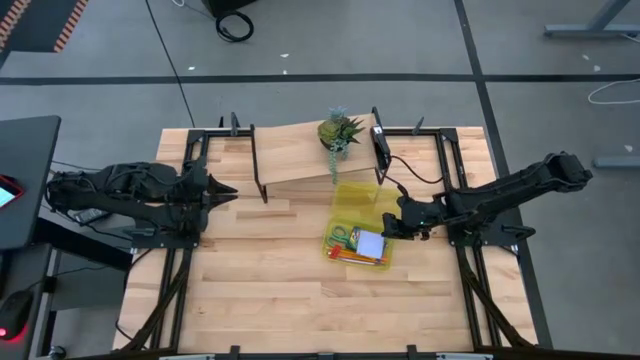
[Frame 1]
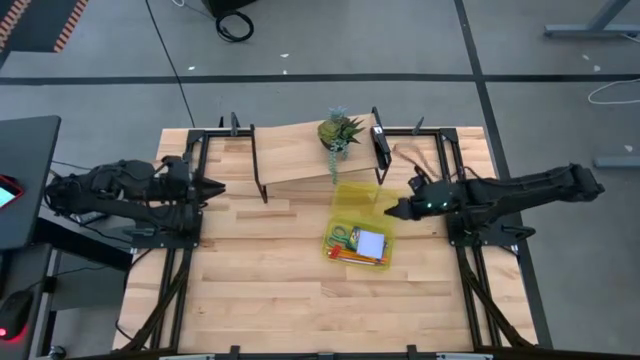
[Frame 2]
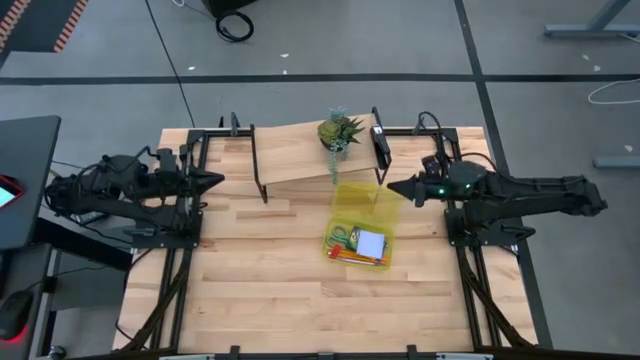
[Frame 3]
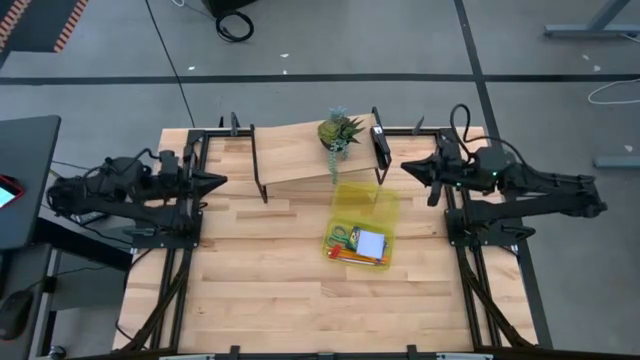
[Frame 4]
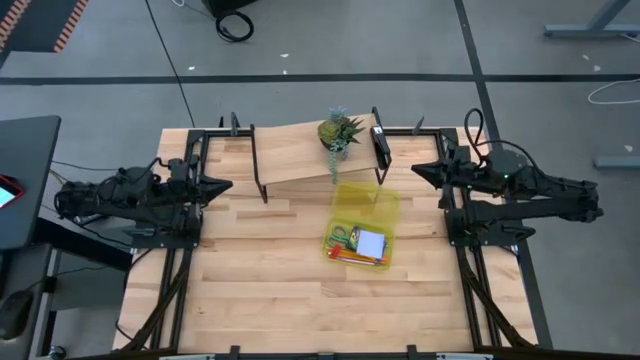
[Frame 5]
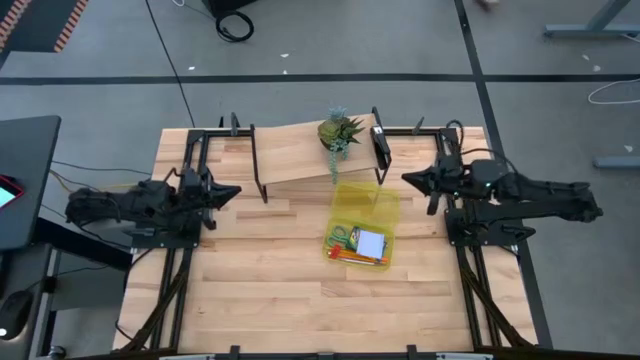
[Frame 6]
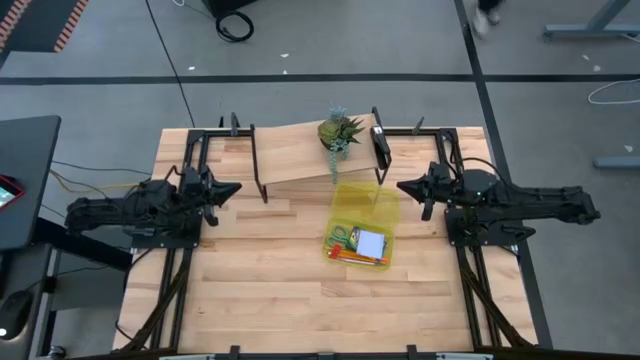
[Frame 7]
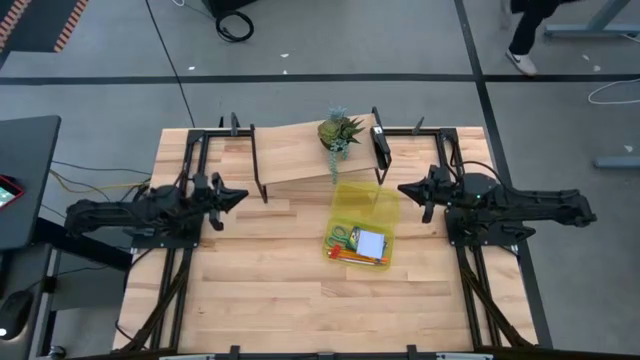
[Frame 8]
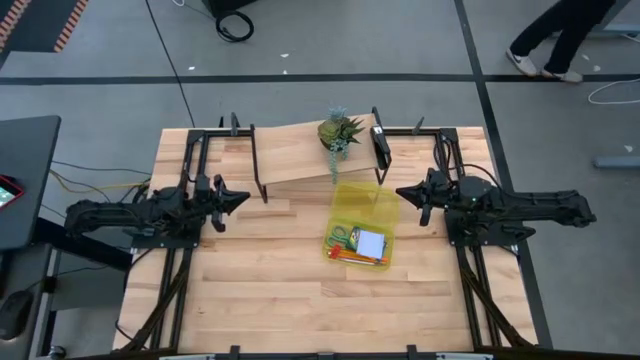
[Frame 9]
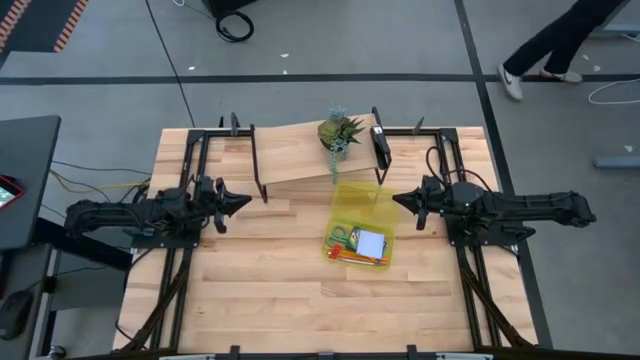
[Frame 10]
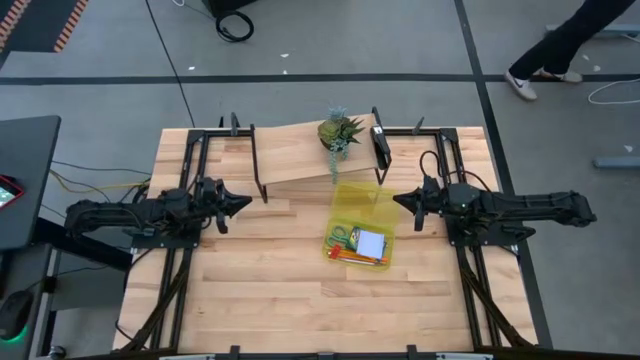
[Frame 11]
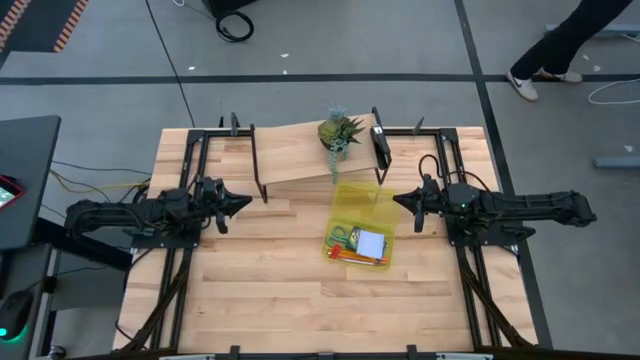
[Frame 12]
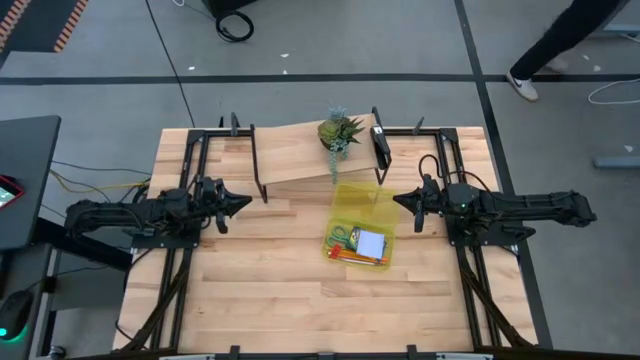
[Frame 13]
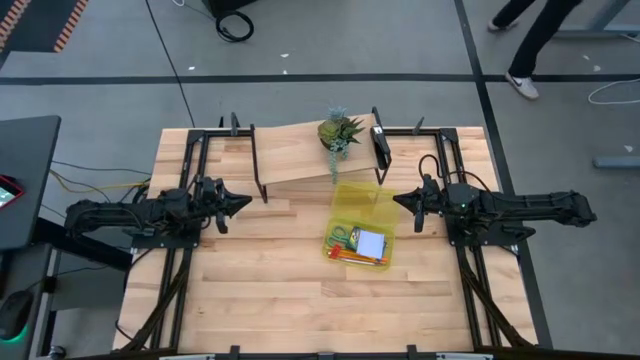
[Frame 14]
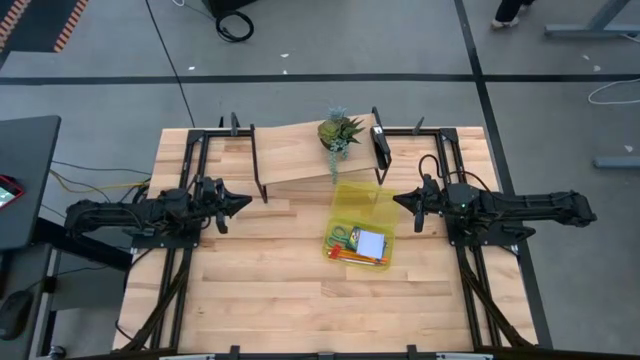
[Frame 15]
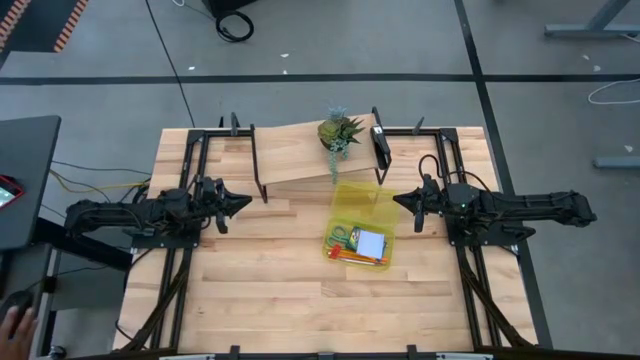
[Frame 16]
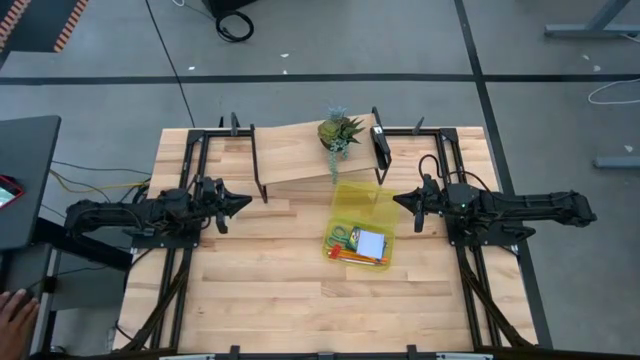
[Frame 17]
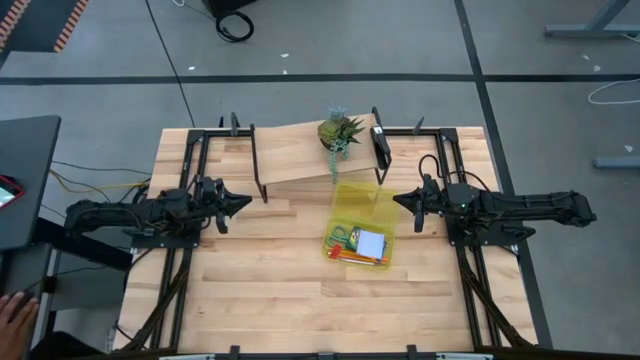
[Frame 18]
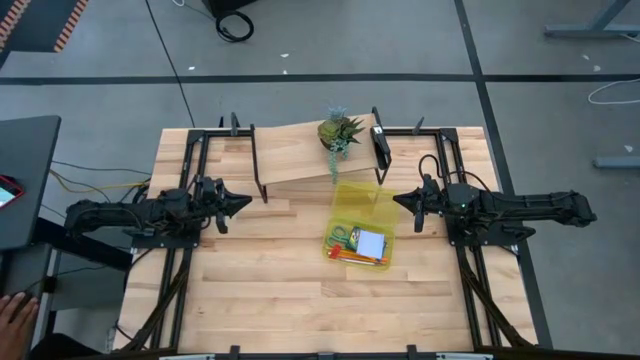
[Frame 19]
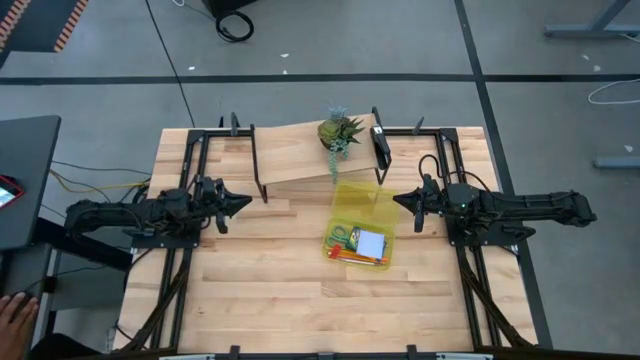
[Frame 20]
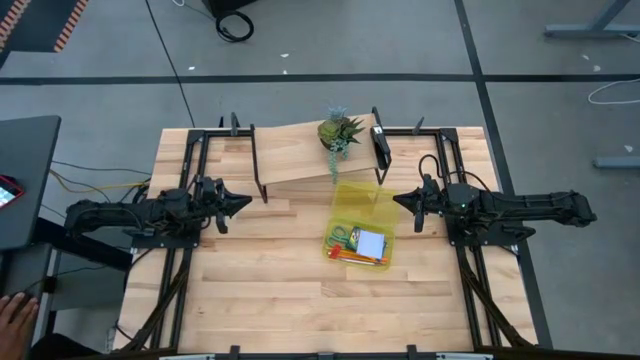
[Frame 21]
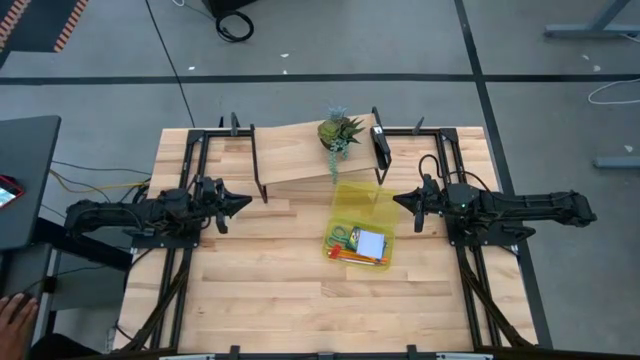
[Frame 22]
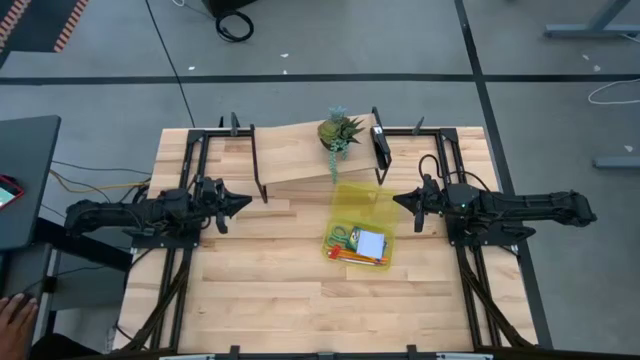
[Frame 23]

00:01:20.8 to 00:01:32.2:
Task: Pack school essentials
Return to Home Position

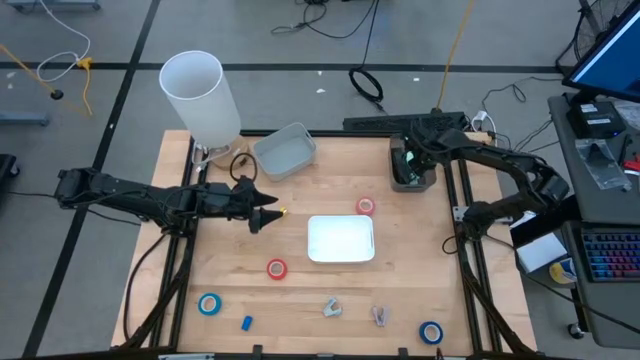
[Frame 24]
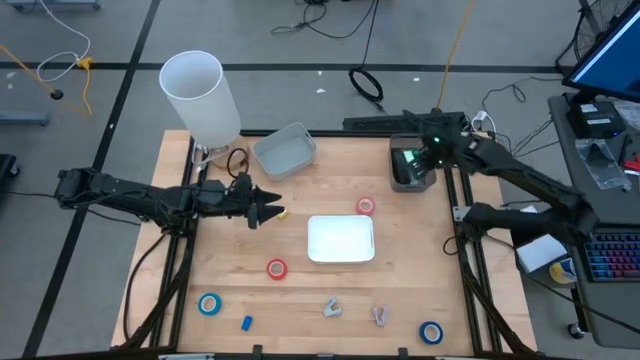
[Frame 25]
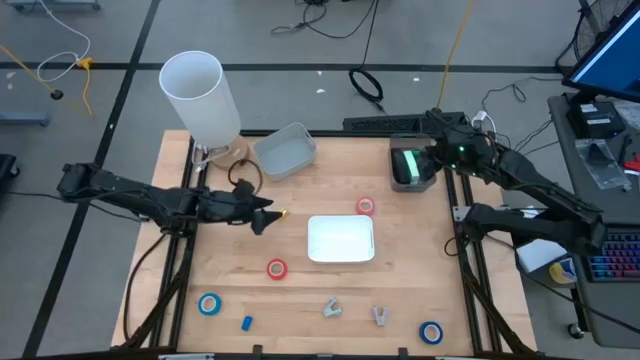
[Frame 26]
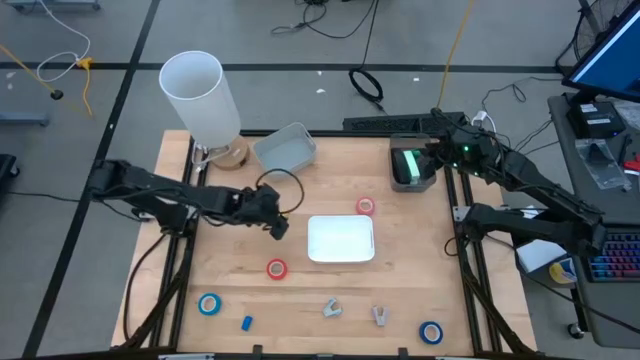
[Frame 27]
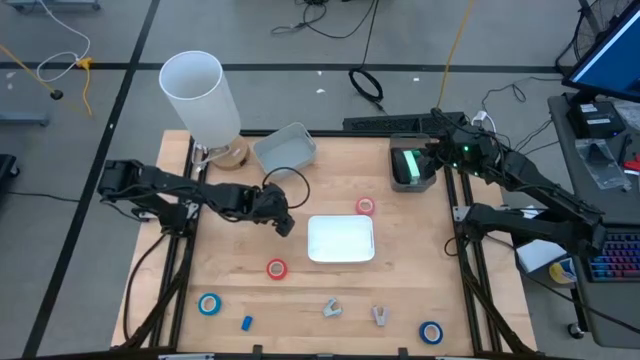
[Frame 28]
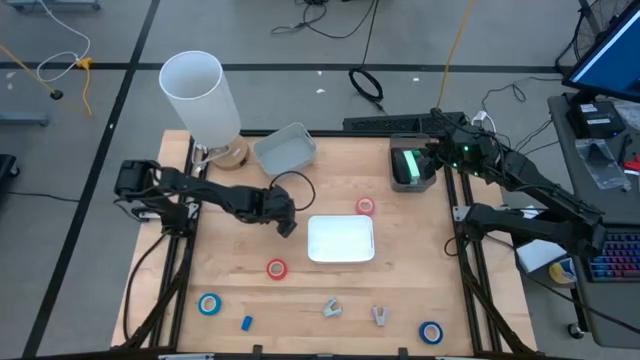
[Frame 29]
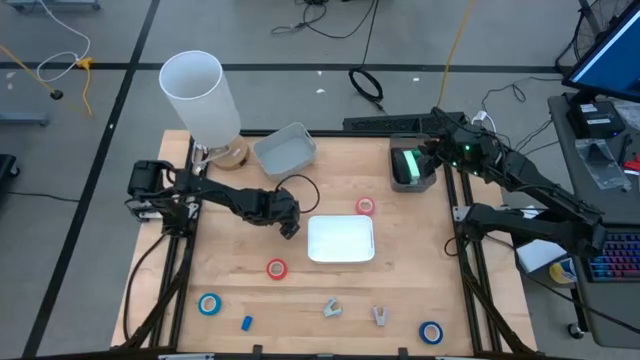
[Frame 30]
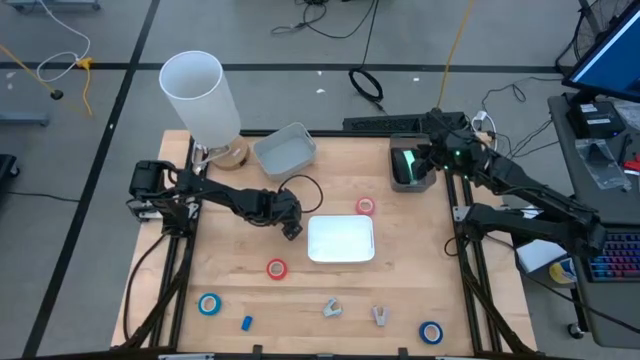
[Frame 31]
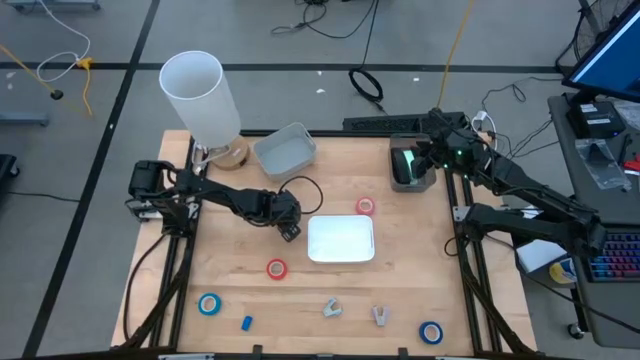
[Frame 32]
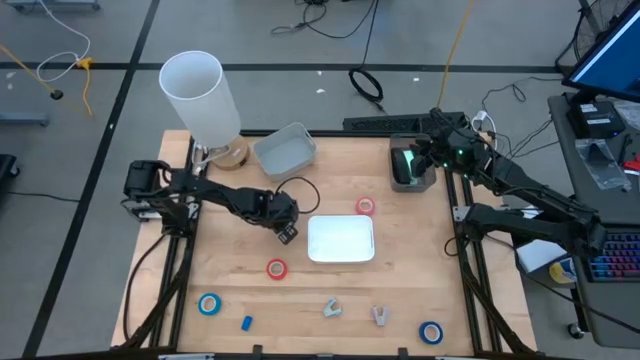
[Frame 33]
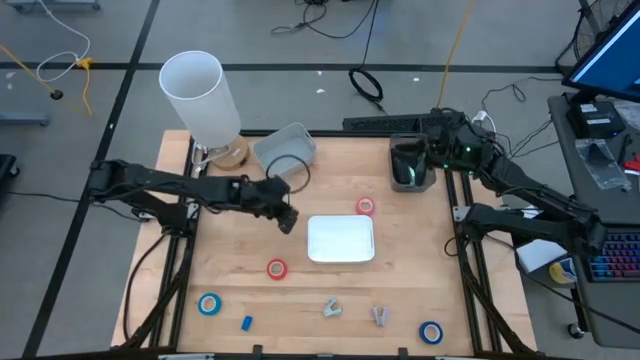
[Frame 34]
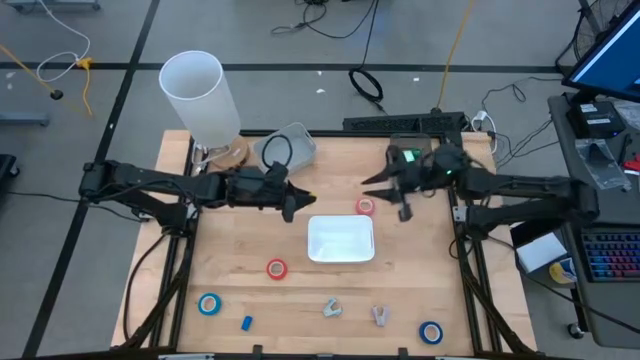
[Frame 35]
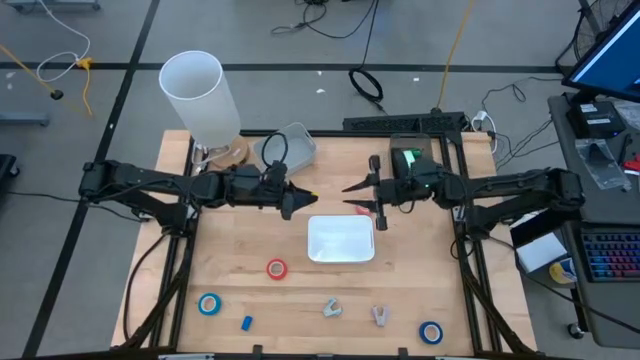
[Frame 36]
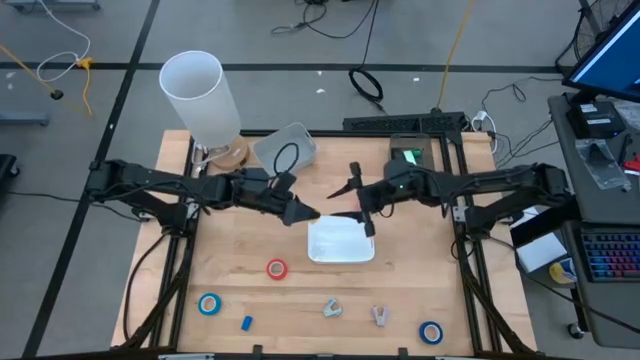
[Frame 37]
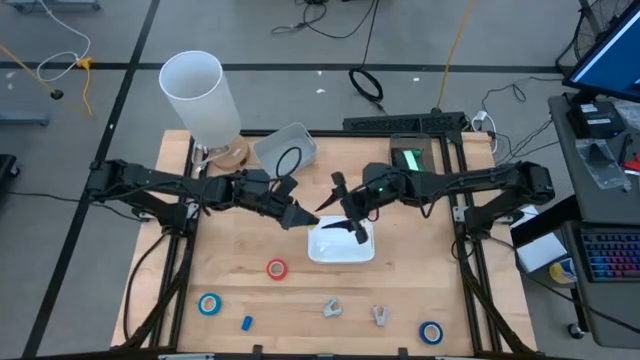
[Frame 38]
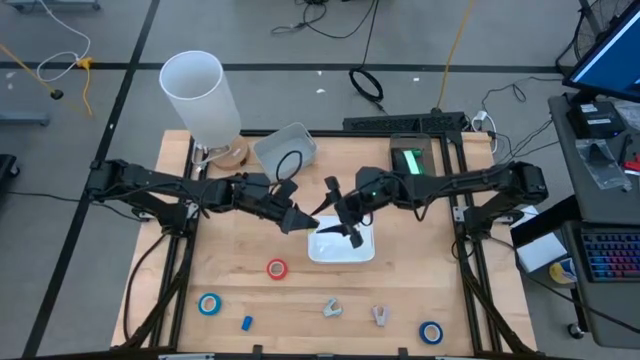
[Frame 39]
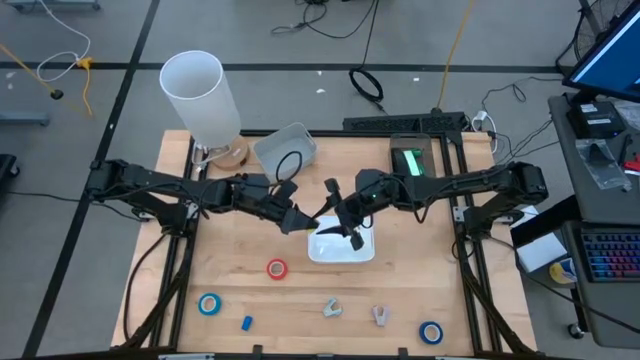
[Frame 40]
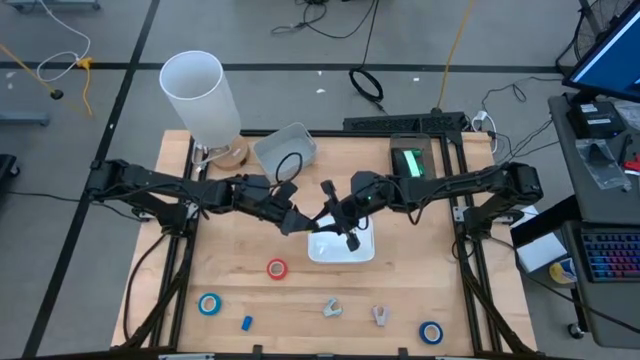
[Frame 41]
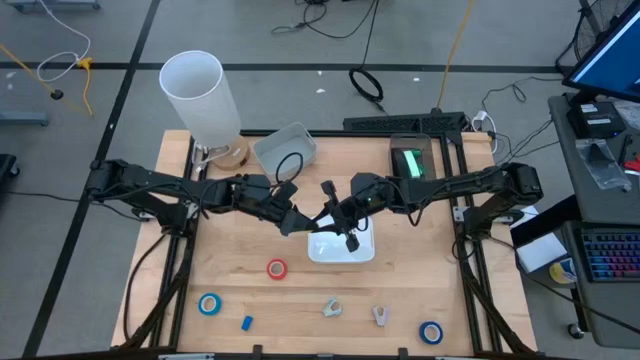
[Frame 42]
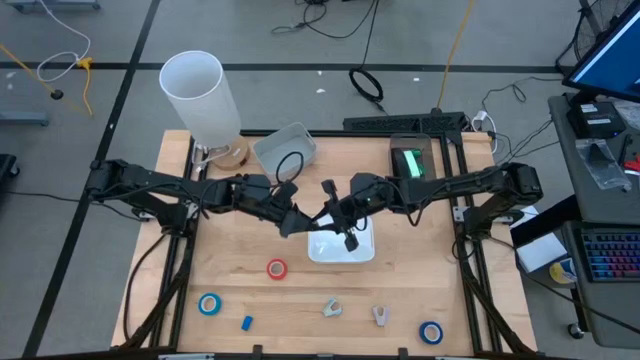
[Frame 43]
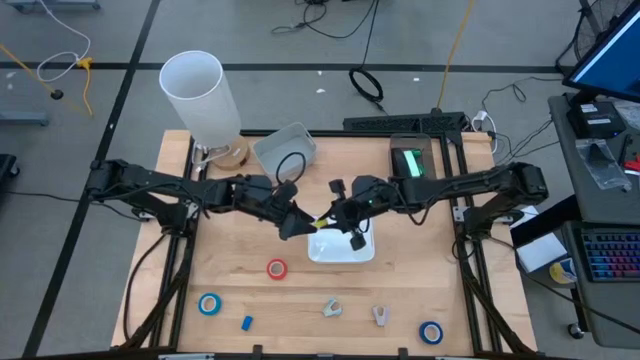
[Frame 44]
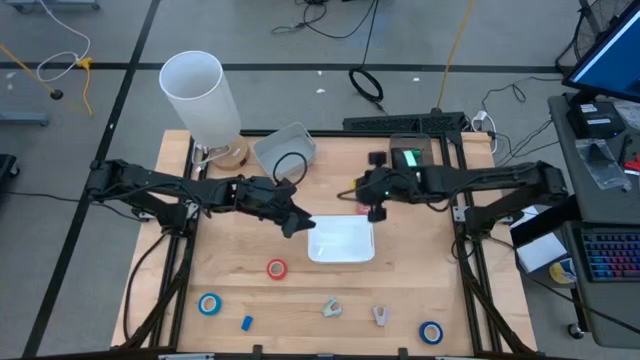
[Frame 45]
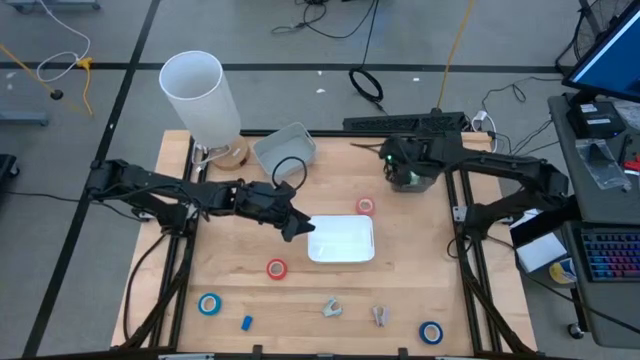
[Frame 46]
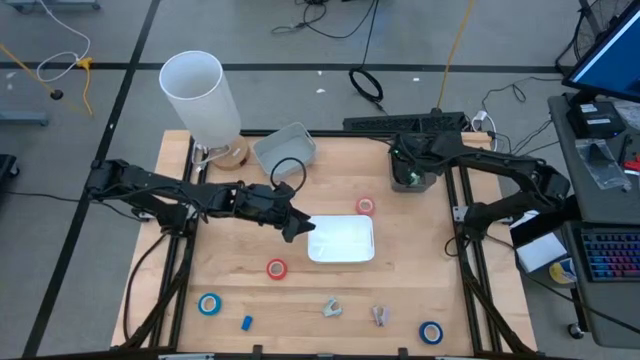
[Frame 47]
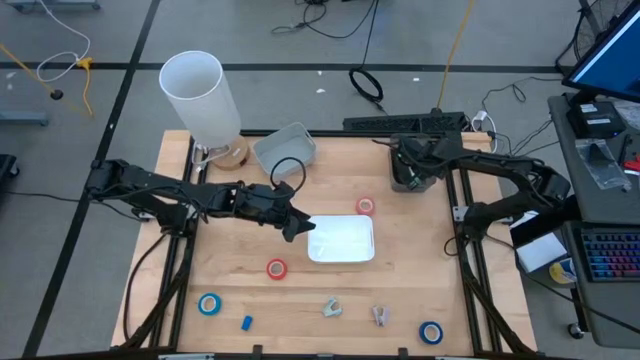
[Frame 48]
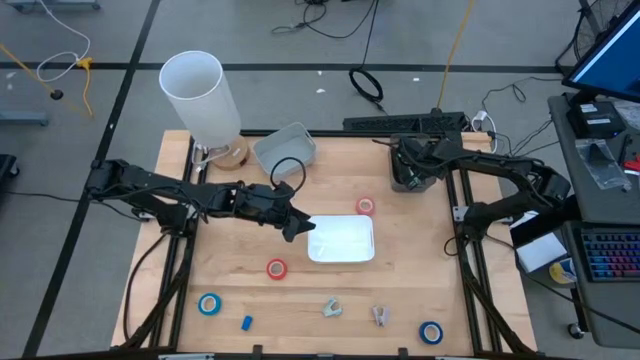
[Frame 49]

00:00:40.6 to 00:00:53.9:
Task: Pick and place Stapler, Stapler remover, tape
Put the yellow stapler into the black bin
